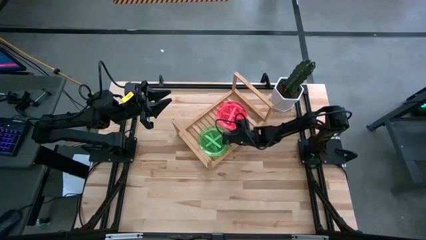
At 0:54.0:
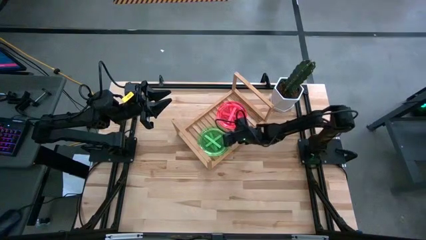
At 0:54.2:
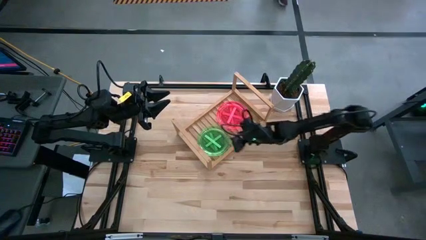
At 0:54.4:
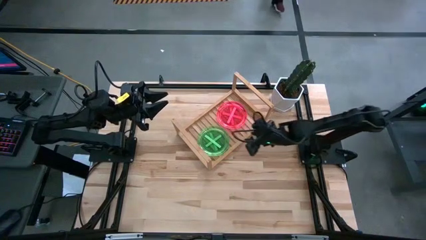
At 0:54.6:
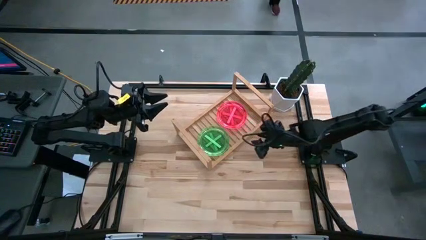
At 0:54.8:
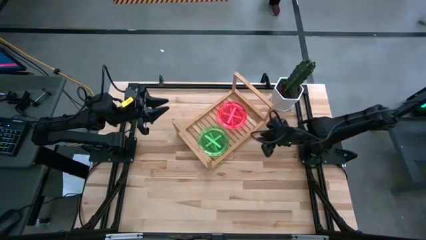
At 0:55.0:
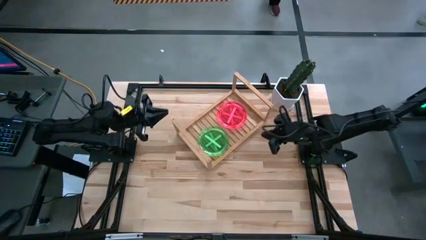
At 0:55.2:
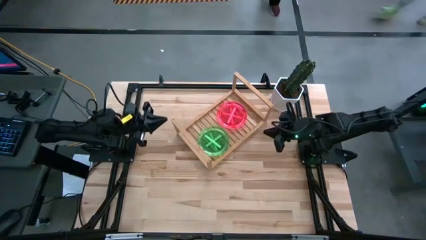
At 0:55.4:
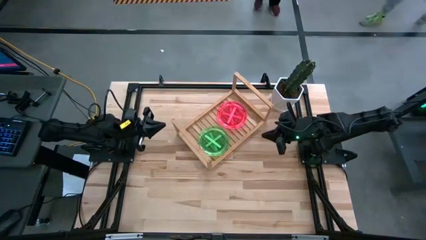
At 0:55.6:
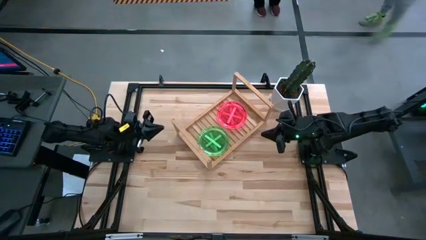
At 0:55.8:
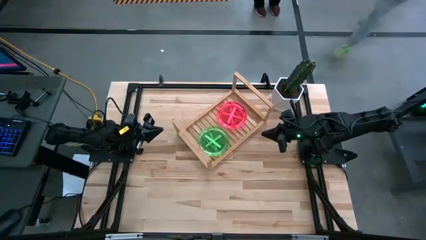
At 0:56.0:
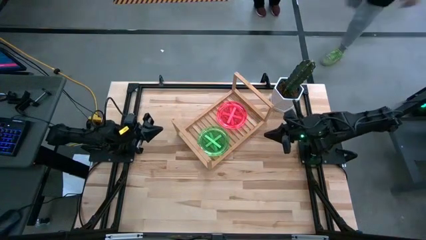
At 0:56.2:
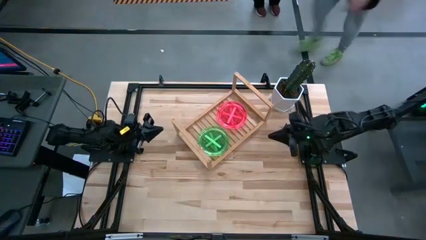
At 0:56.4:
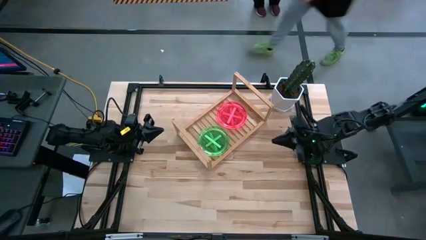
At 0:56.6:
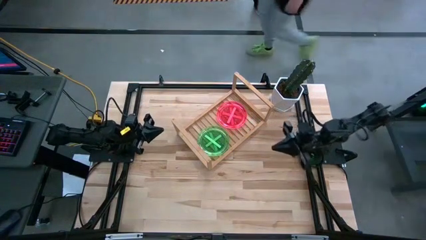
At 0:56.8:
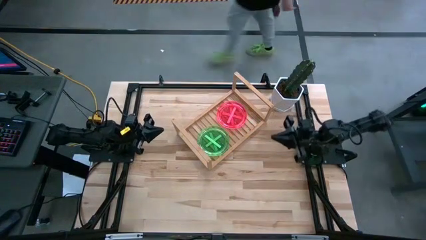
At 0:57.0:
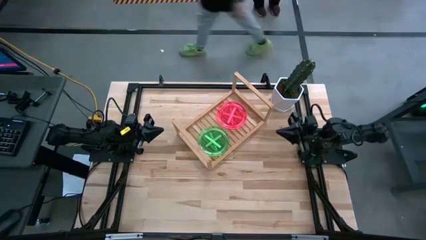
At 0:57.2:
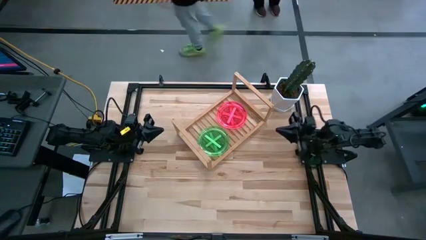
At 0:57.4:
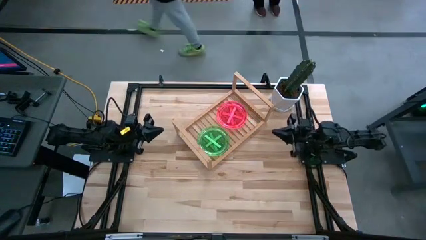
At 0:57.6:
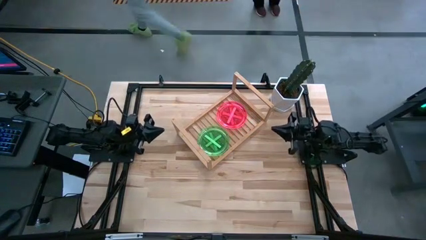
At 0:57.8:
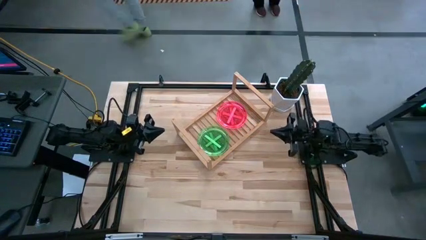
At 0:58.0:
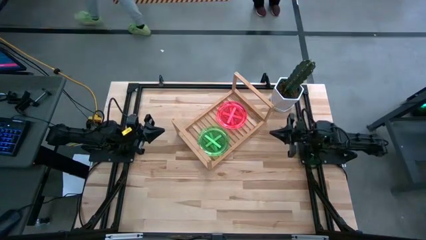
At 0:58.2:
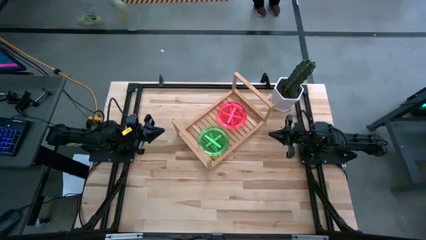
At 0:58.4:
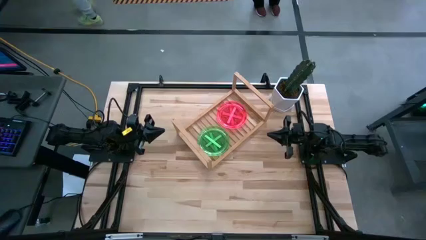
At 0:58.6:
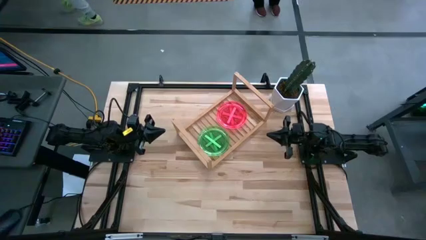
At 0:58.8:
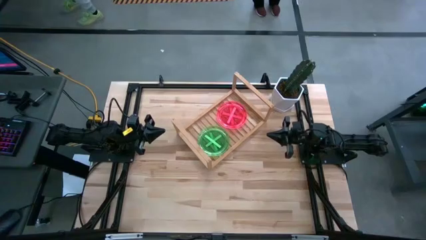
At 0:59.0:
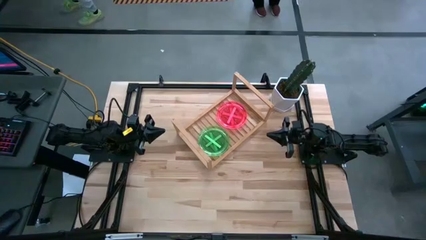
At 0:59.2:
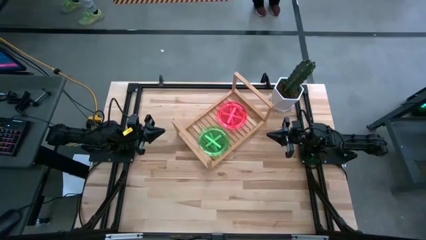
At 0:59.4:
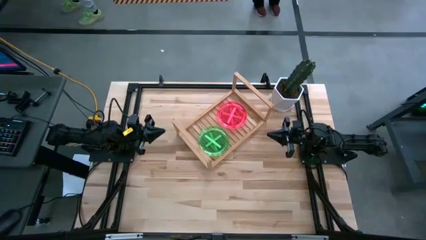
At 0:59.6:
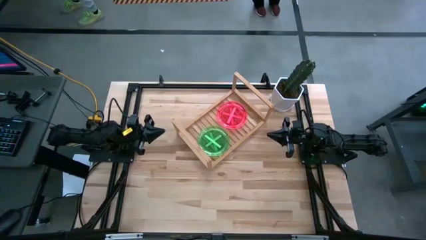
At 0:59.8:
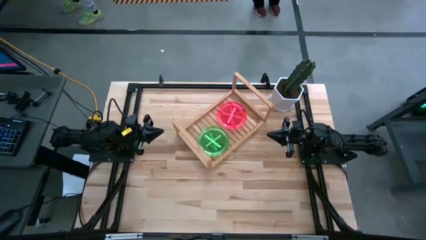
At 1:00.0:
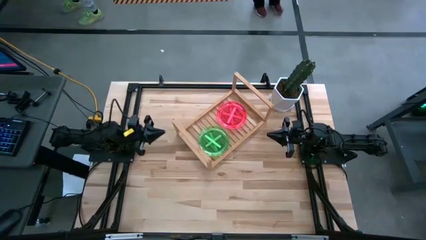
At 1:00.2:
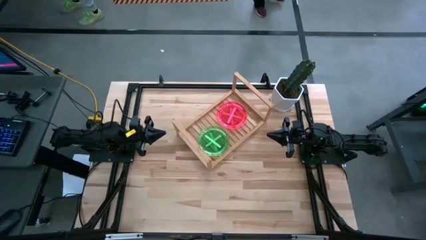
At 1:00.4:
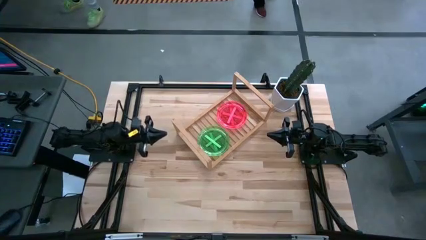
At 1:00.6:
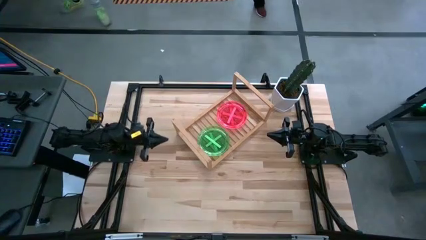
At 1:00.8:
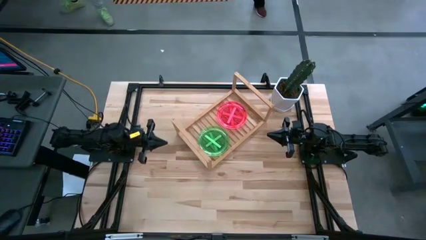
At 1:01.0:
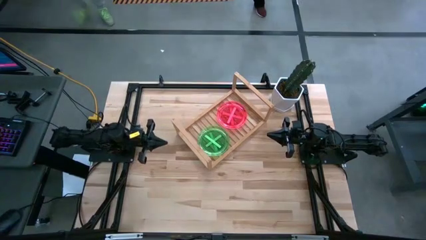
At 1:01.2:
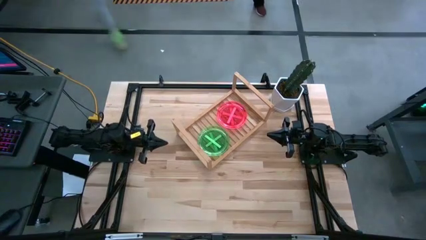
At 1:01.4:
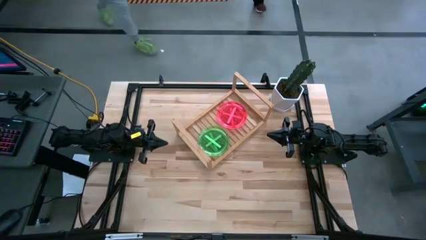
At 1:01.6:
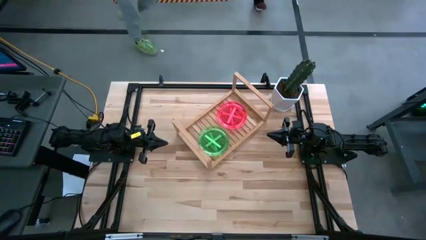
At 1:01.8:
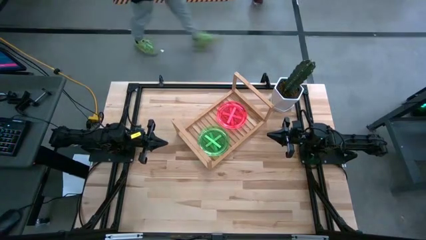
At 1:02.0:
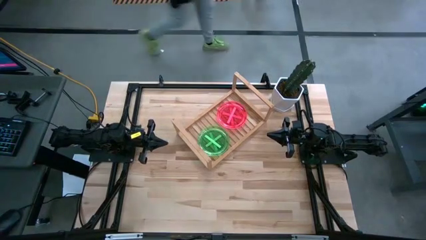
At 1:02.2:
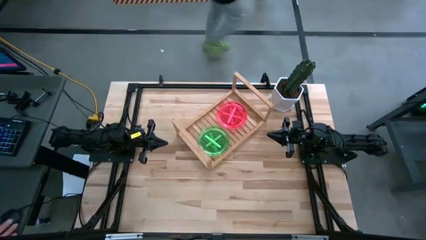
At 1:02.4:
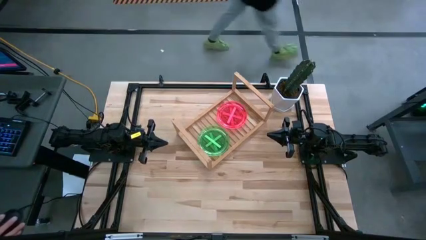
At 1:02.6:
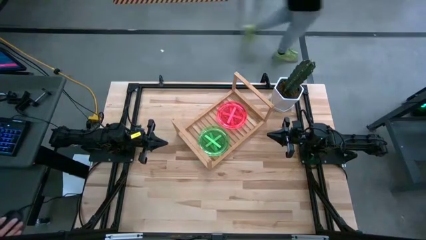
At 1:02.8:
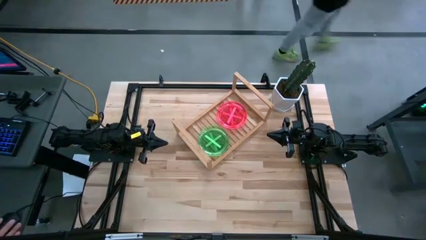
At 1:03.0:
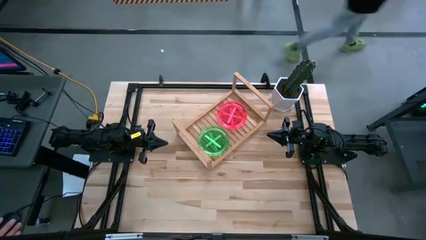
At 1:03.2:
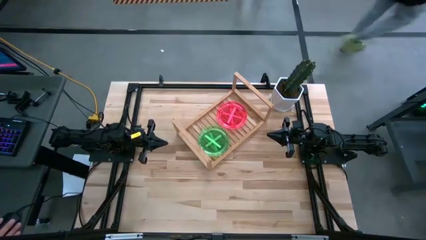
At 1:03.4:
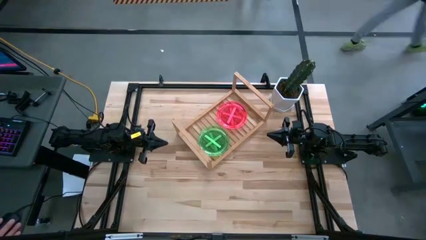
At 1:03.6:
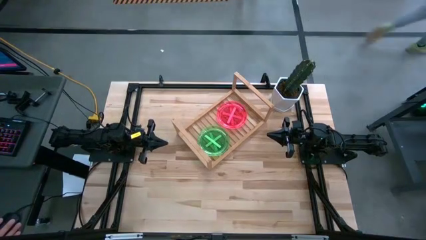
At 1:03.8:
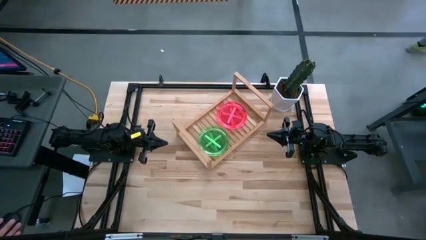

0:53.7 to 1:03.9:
Task: Place and stack plates onto a shelf
Return to Home Position

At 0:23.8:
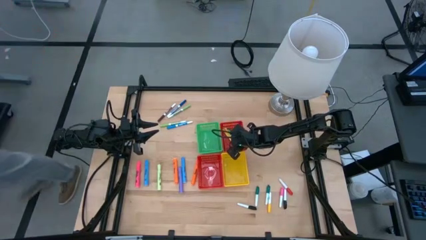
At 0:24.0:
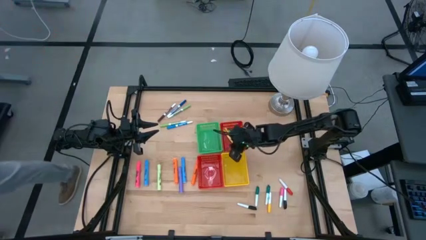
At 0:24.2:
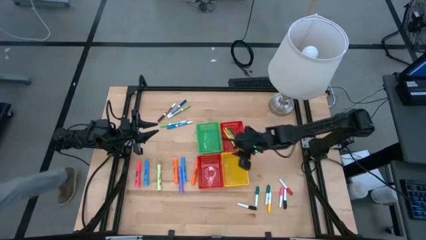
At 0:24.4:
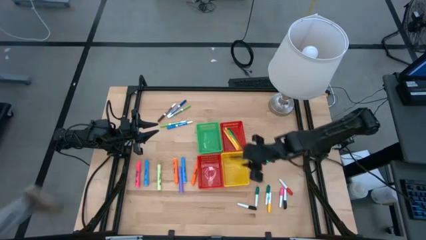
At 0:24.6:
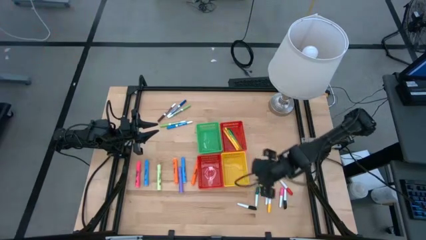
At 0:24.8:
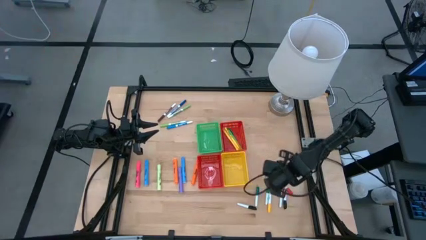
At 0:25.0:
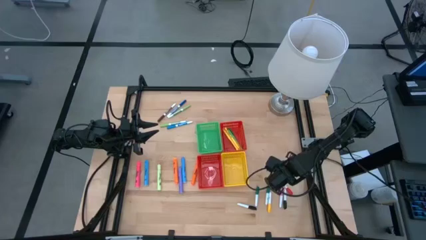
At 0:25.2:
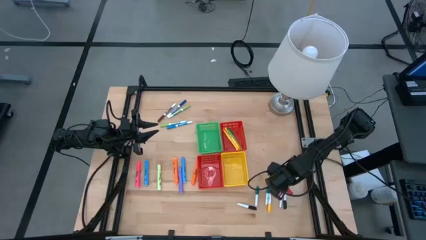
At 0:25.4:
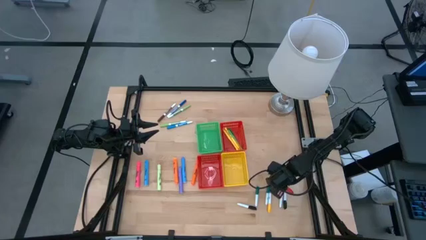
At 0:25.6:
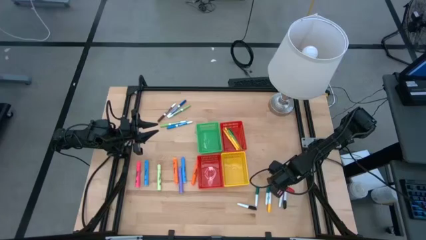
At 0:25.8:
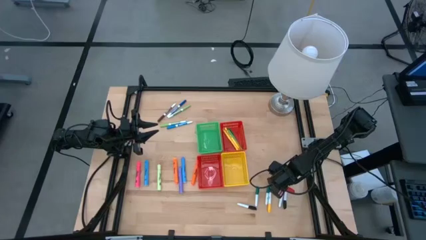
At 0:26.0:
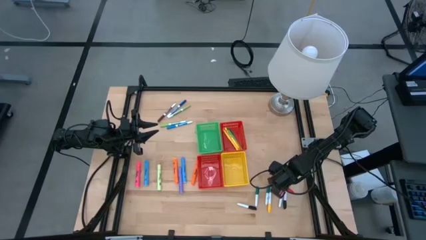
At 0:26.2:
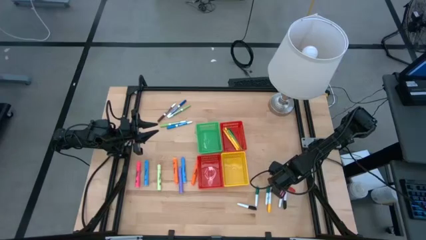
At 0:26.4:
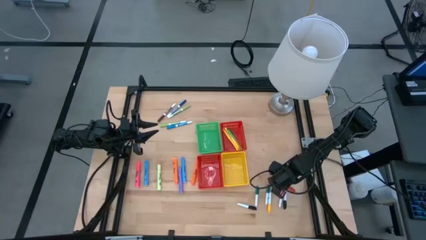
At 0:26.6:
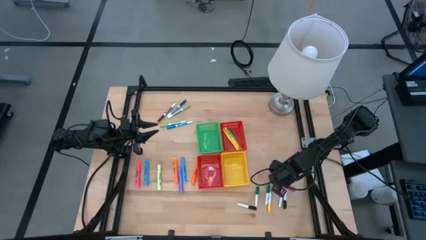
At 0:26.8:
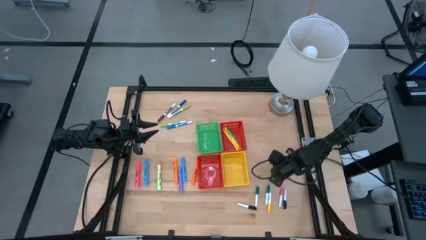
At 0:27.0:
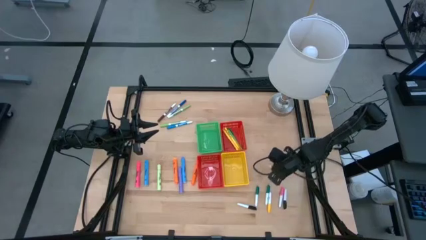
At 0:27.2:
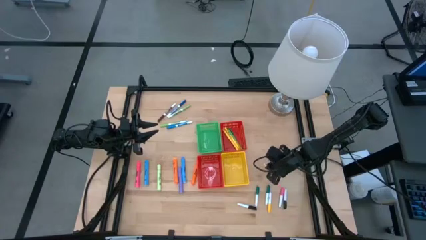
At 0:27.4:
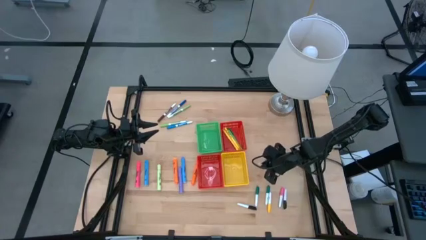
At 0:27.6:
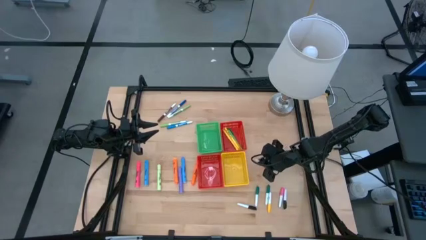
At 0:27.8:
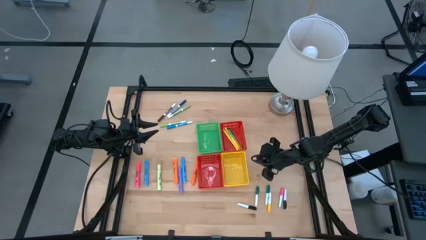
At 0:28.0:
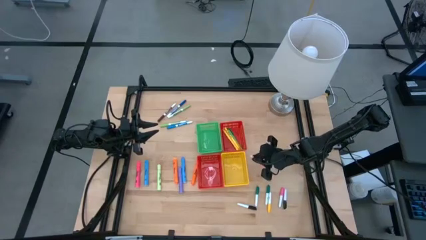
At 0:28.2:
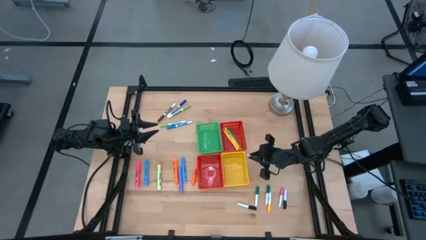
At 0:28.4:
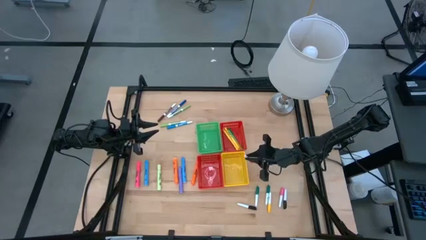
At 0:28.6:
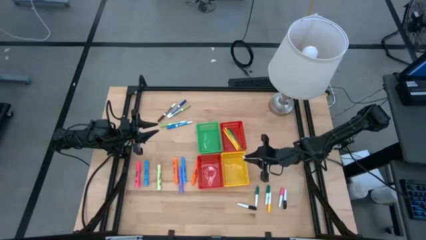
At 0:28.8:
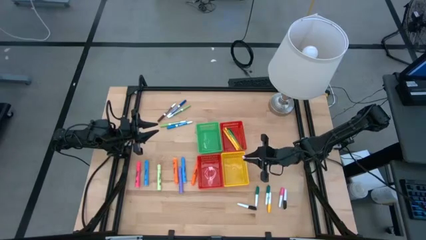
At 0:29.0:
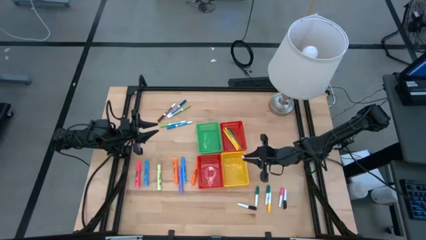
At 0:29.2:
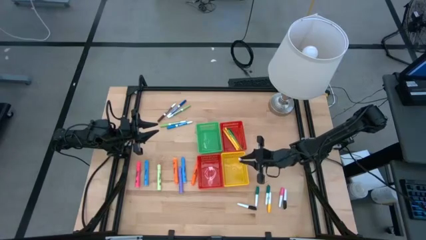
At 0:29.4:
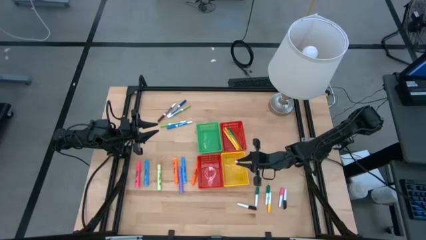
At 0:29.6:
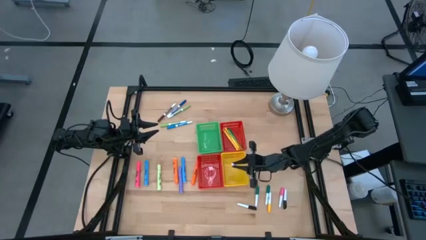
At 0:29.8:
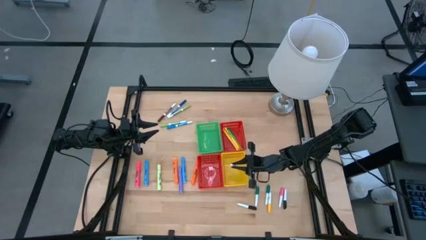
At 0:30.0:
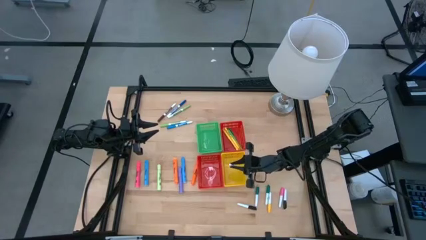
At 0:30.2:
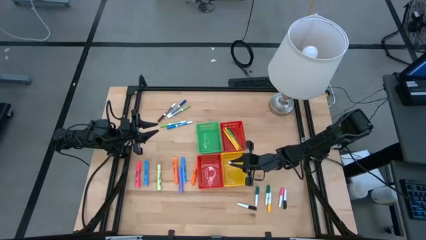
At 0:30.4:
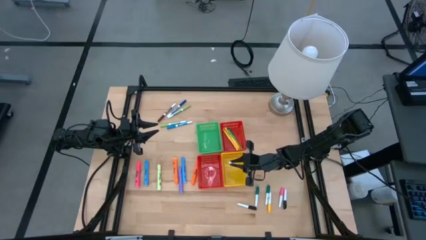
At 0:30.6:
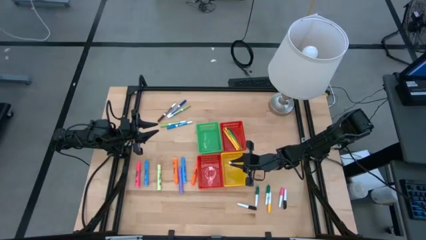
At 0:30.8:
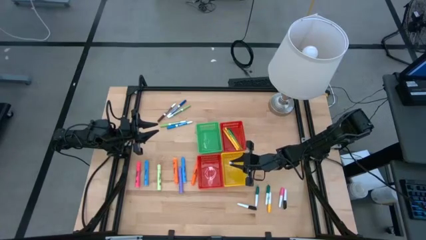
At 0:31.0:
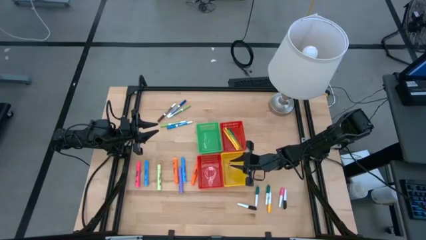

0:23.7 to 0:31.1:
Task: Pick & Place Markers
Put the small red highlighter pen into the yellow bin
